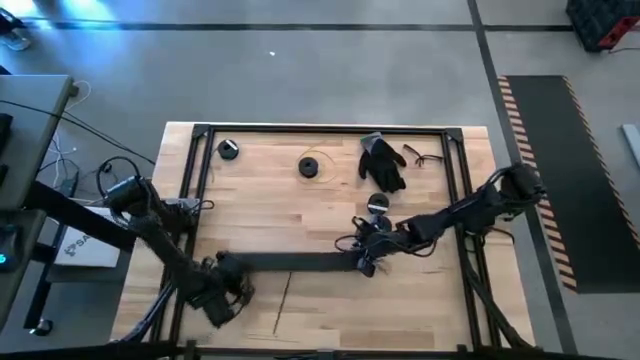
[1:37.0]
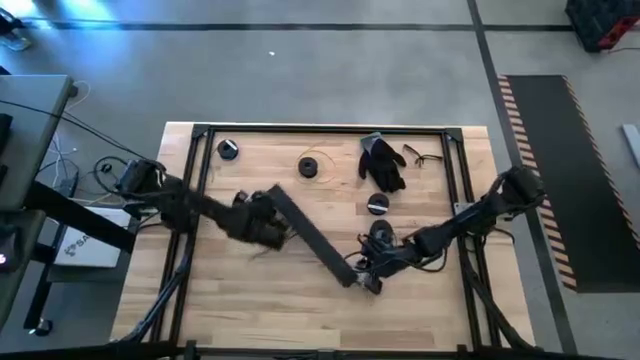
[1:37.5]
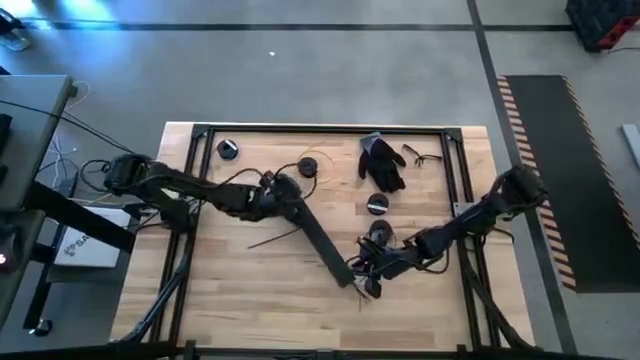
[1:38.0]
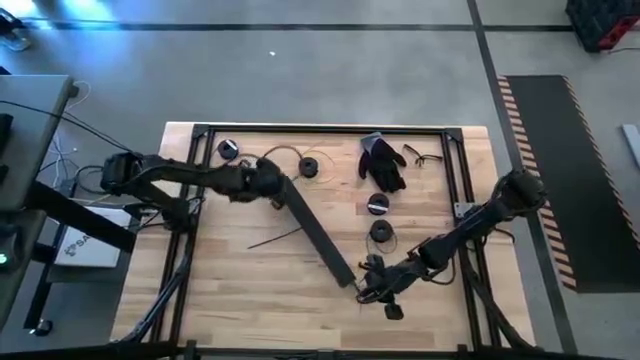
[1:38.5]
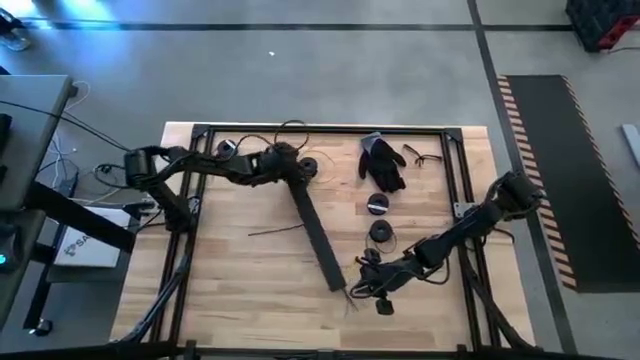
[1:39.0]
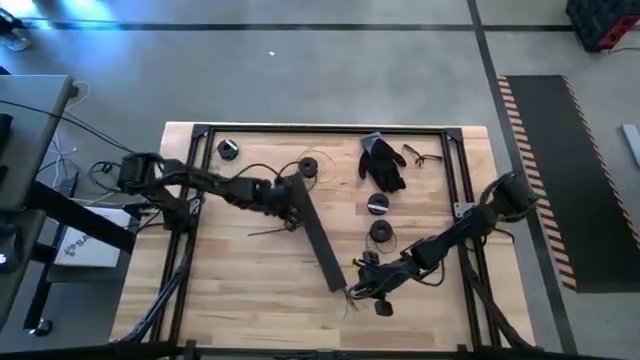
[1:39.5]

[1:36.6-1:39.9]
Task: Ziptie cables
Move the black cable duct to the center of the table

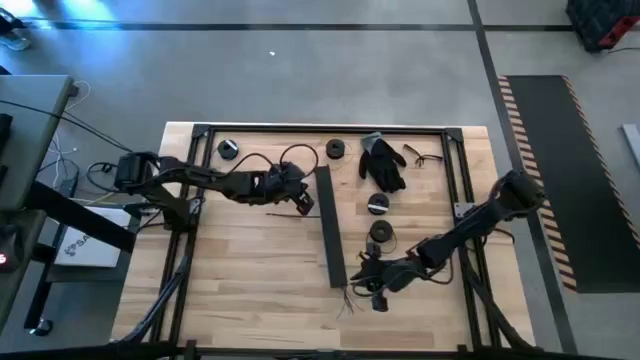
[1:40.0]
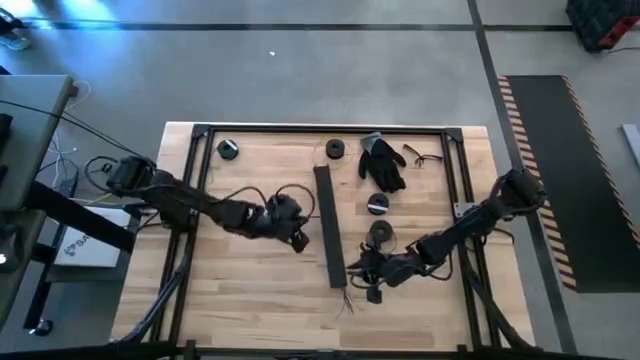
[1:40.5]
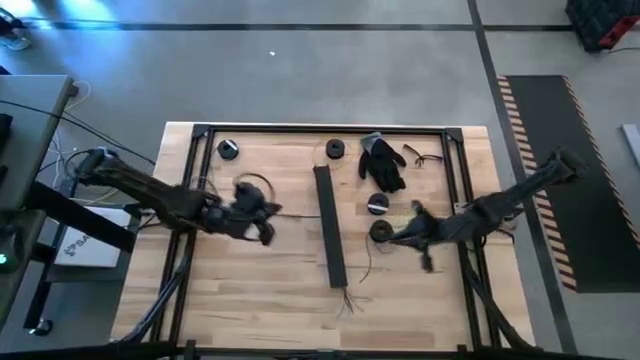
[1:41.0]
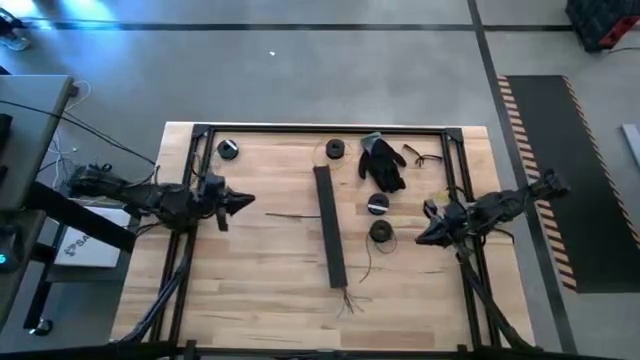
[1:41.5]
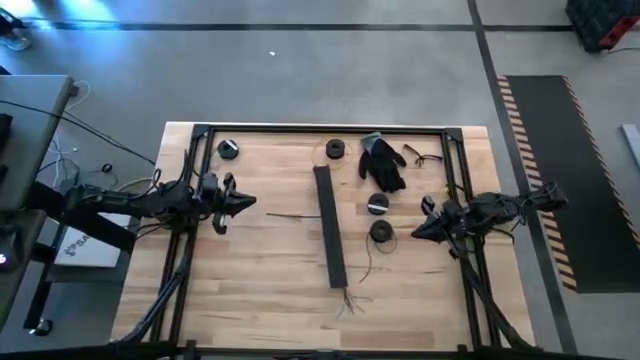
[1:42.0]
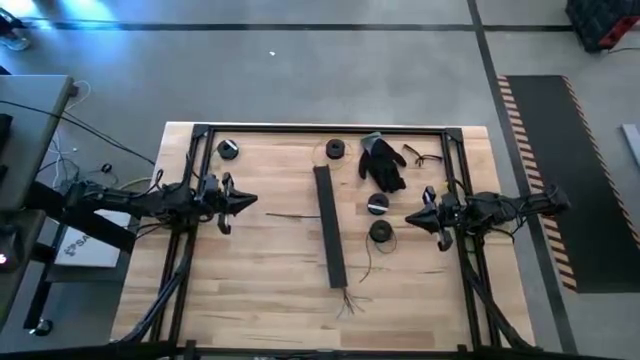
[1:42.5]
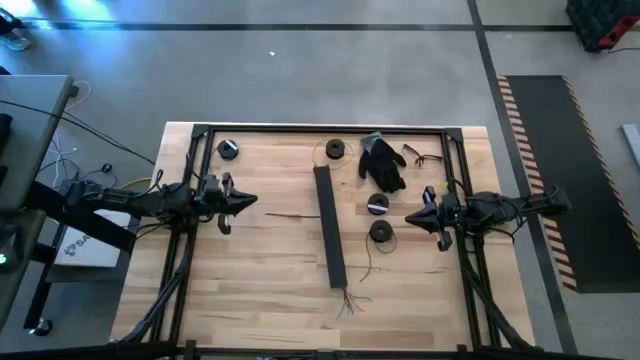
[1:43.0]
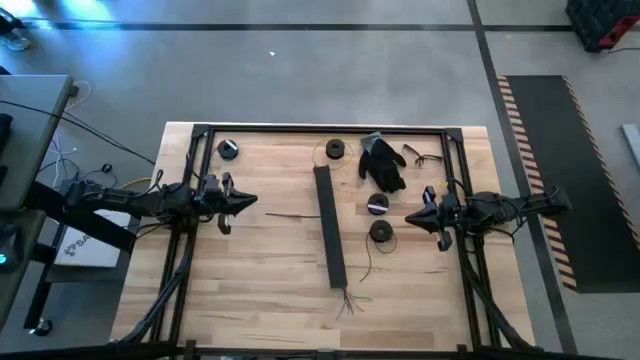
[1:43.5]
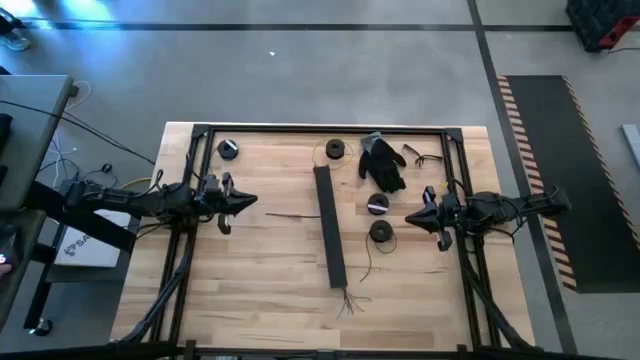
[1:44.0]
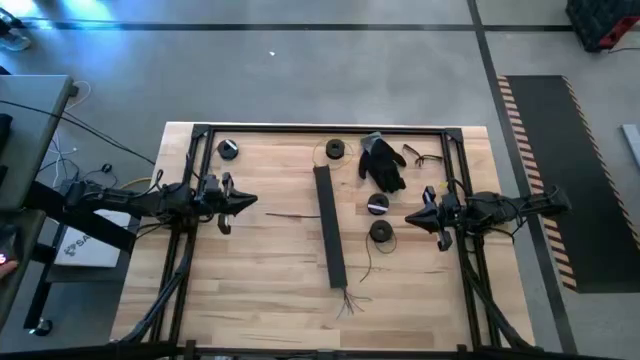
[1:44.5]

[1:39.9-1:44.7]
Return to Home Position

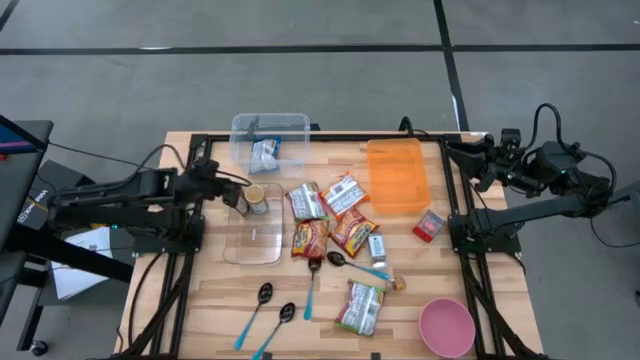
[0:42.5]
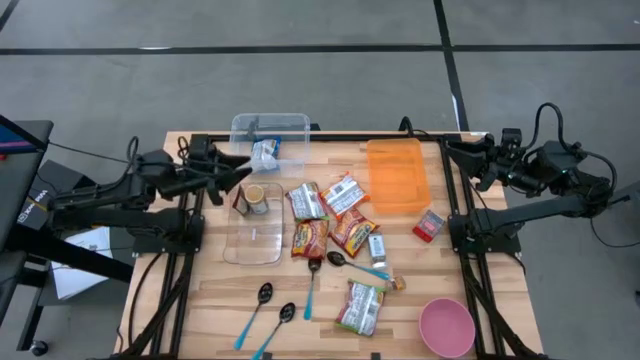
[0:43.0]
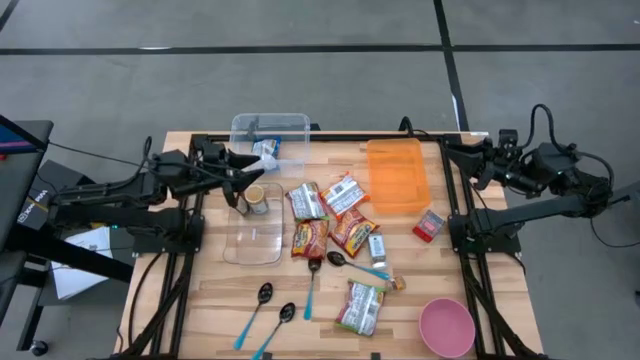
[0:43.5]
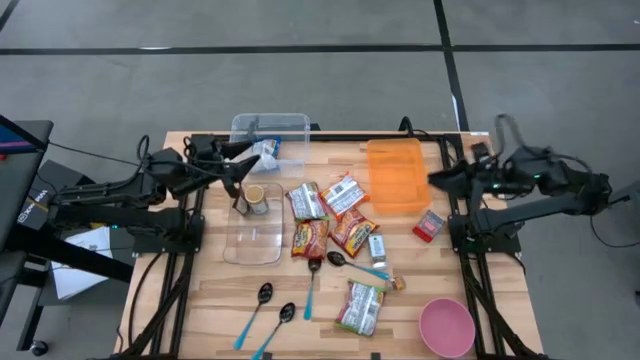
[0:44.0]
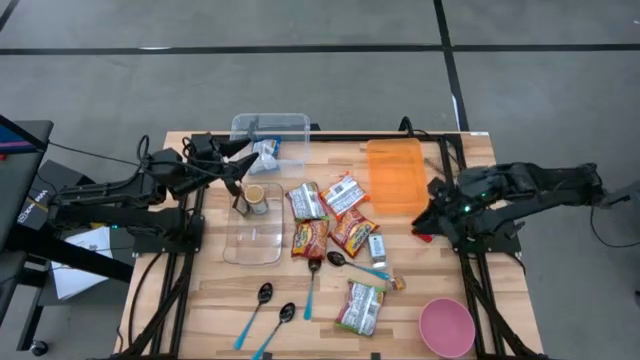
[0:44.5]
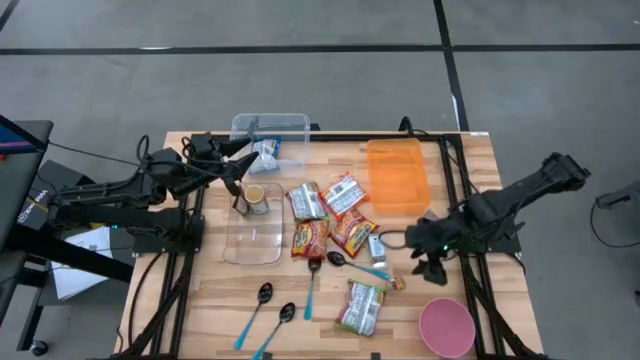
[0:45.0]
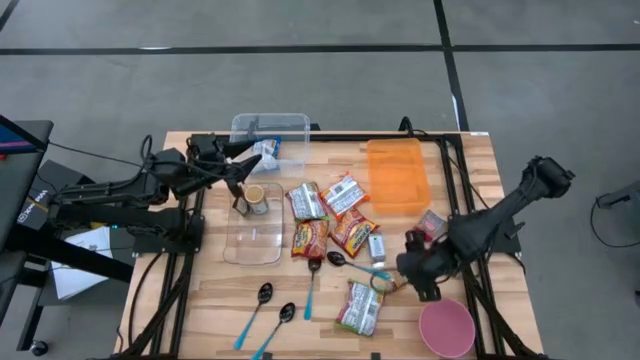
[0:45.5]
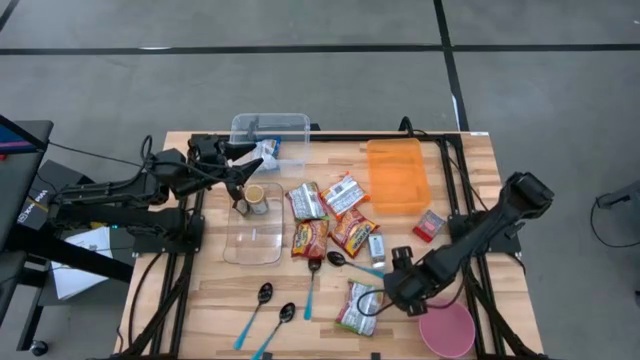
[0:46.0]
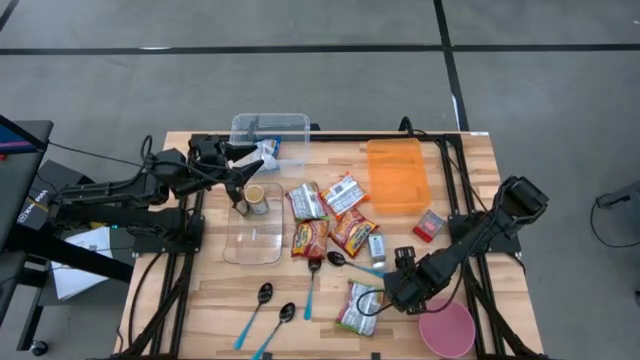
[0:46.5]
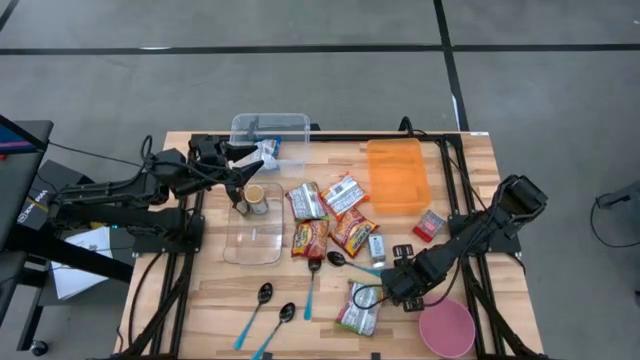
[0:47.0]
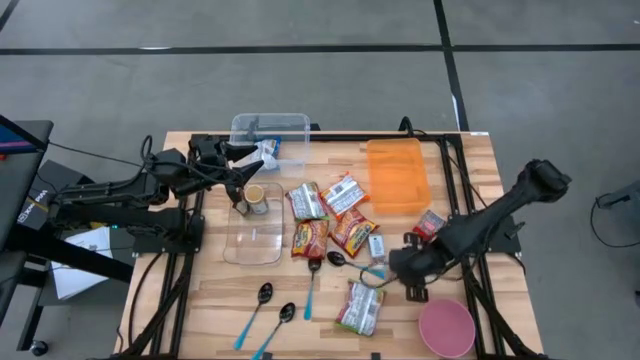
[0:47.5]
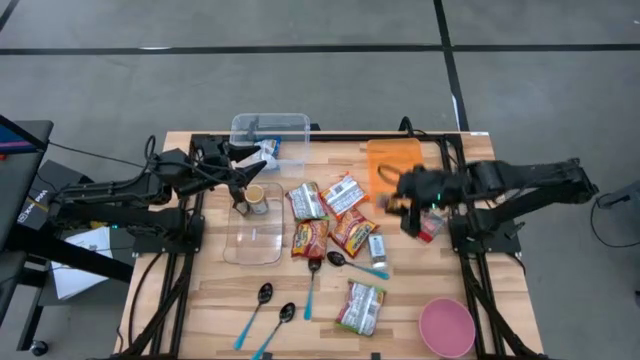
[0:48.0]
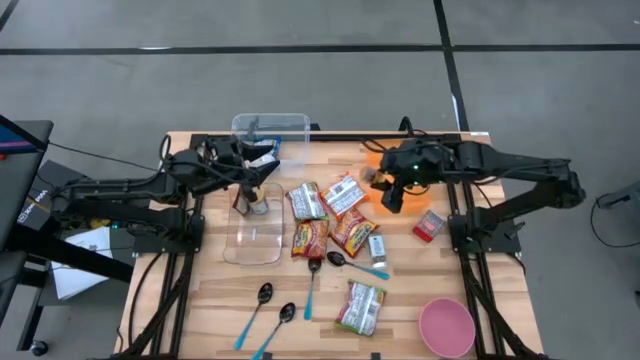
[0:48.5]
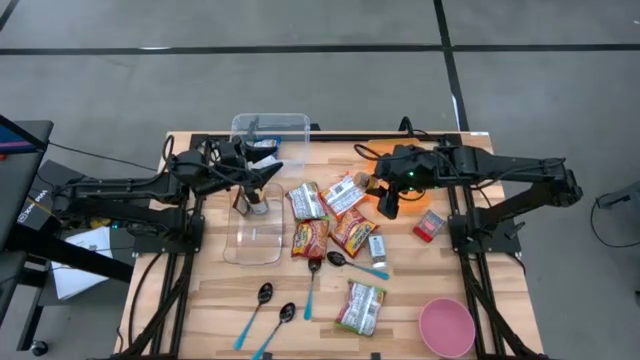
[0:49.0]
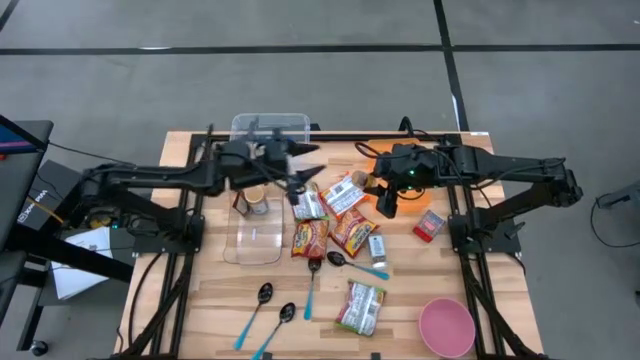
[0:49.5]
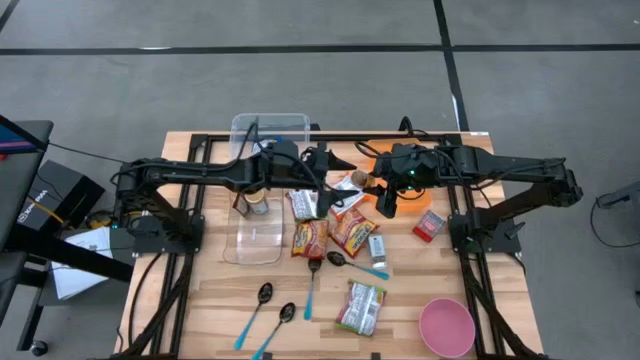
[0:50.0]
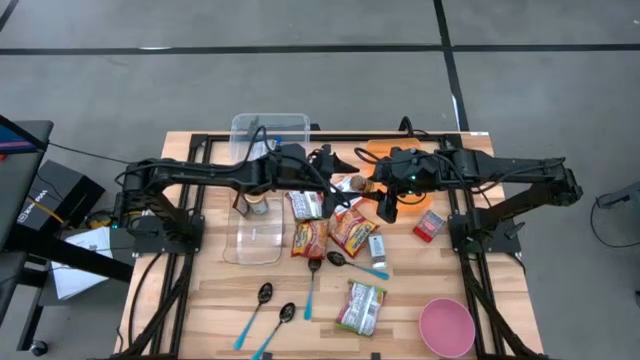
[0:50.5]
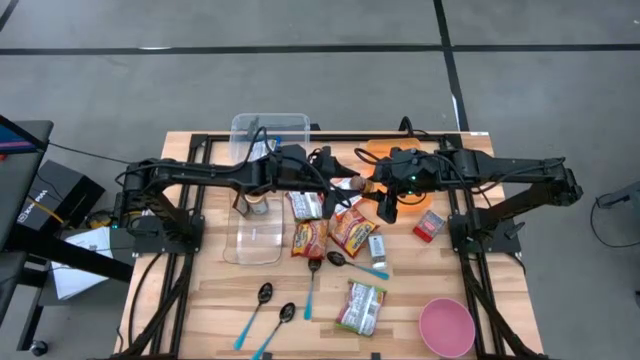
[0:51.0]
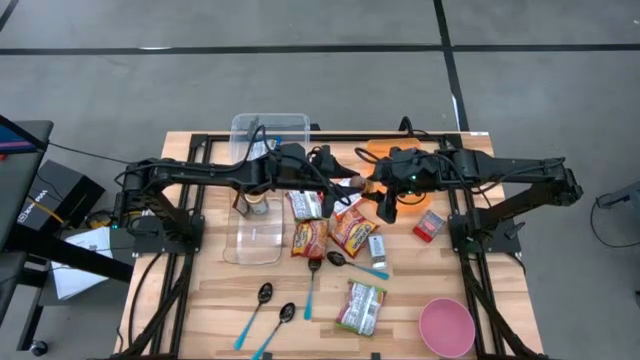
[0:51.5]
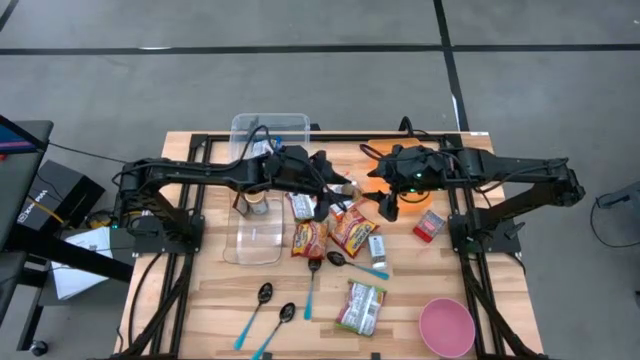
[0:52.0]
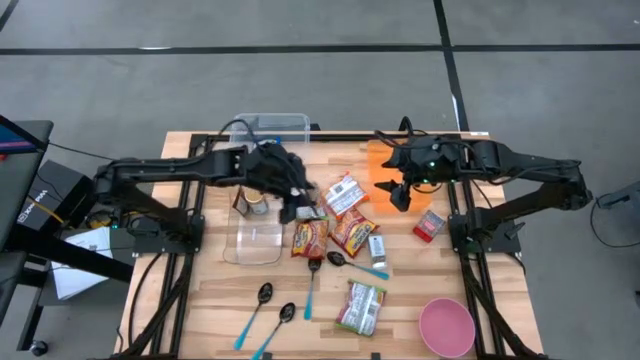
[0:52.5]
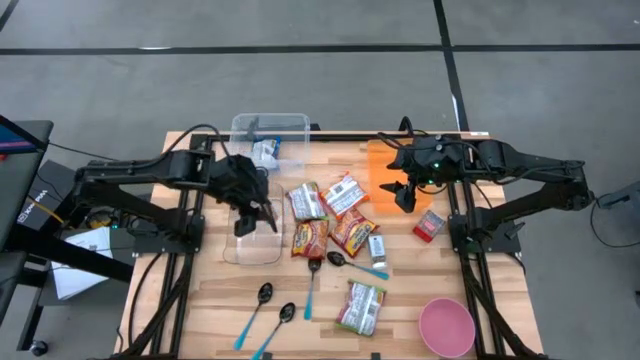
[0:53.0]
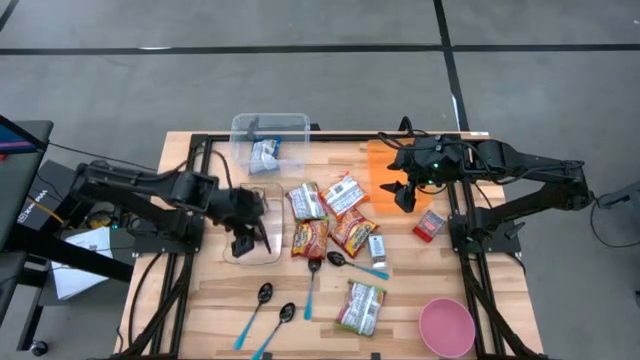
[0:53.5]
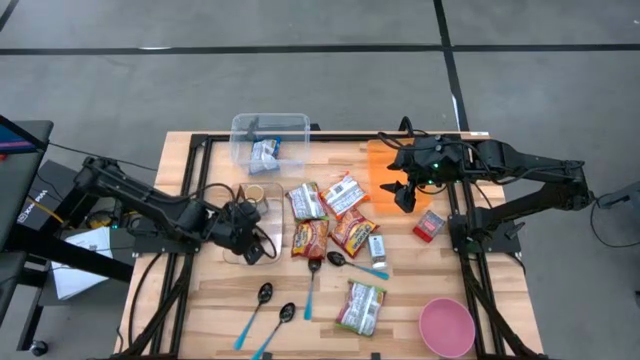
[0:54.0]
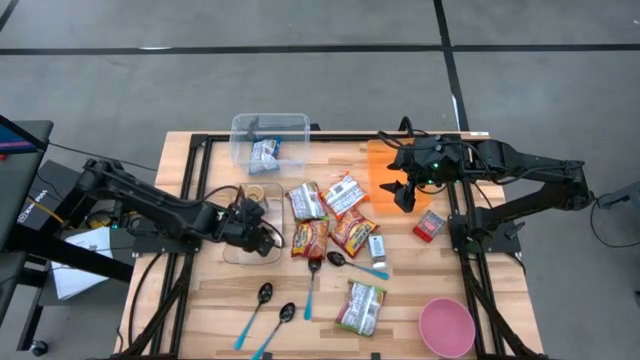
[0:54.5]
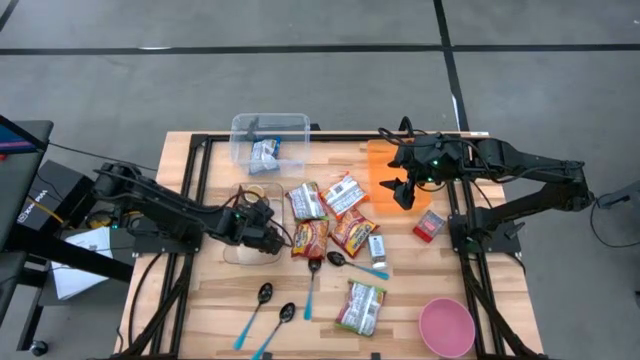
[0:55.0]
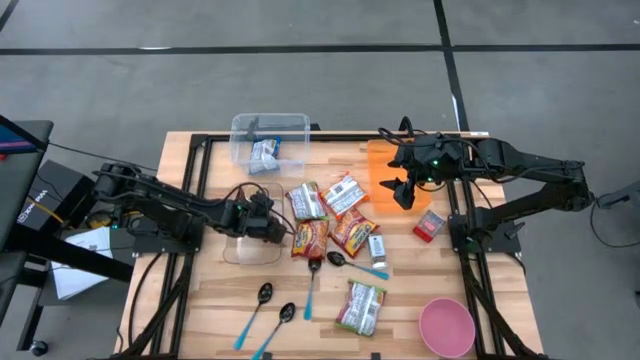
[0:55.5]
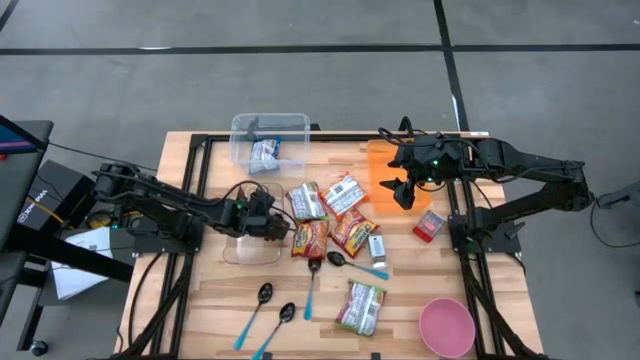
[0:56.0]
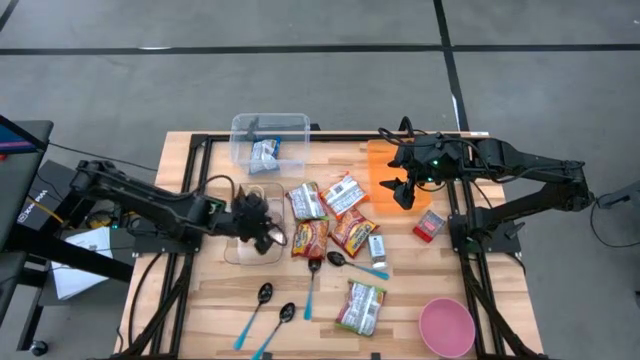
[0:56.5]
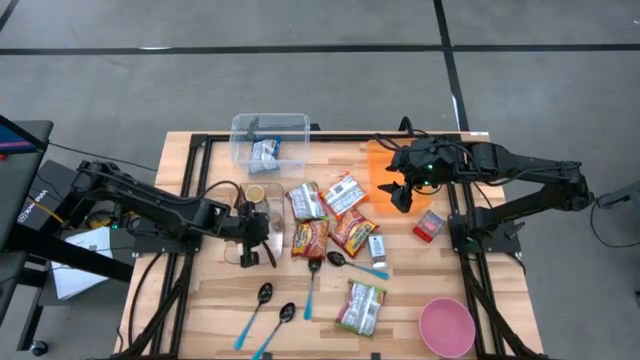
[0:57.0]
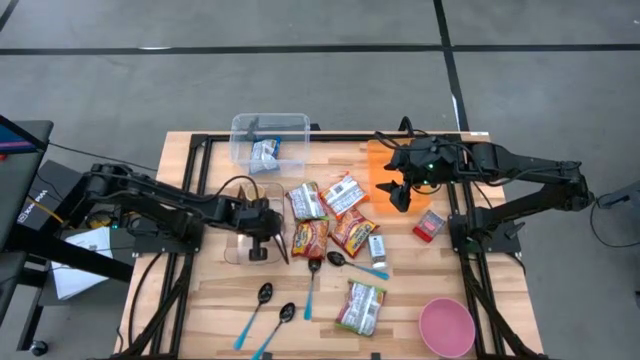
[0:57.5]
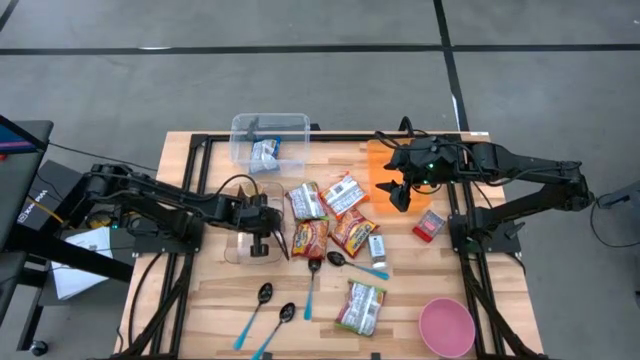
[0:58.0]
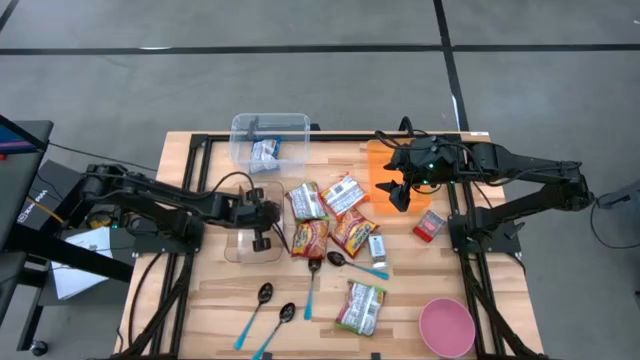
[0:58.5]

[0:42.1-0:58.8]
Task: Pick & Place Food Item
Put the brown seasoning bottle into the transparent bin
